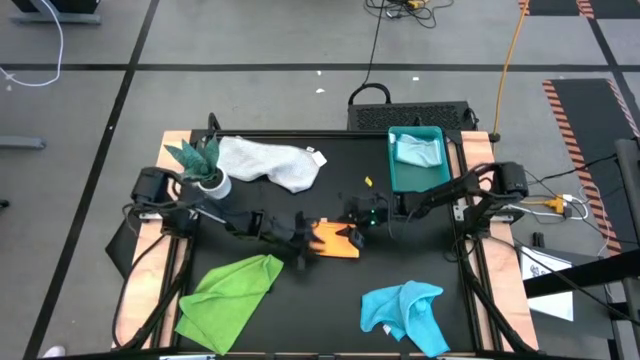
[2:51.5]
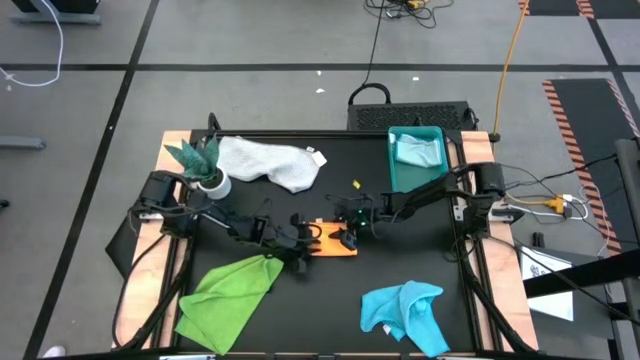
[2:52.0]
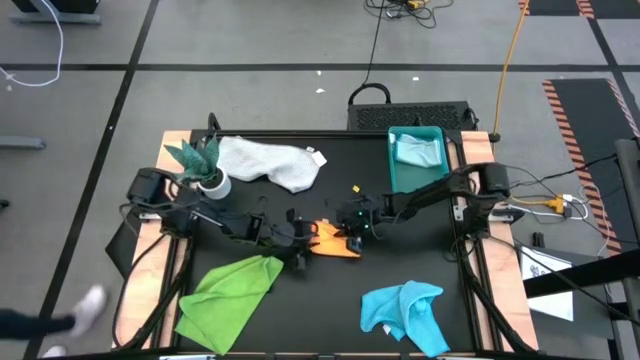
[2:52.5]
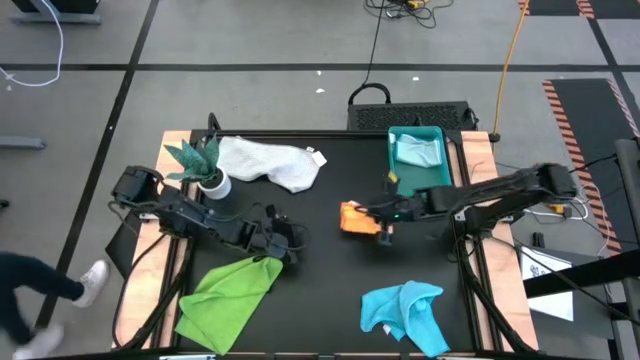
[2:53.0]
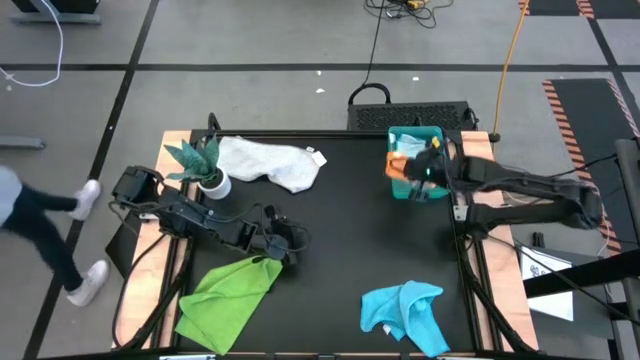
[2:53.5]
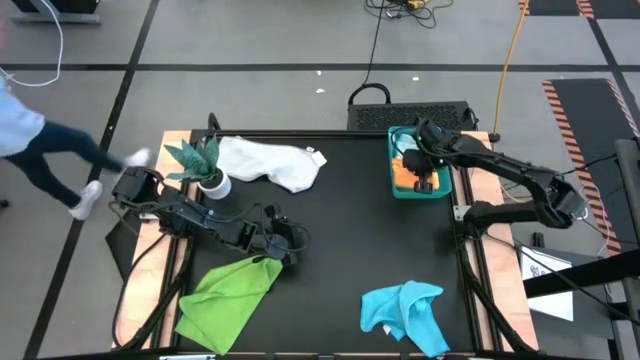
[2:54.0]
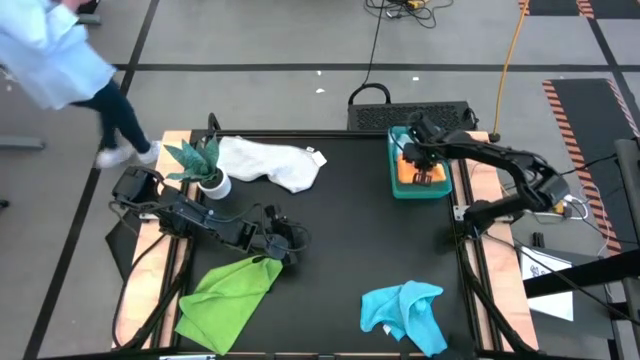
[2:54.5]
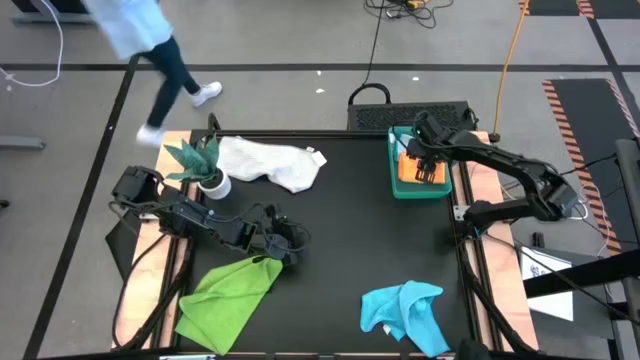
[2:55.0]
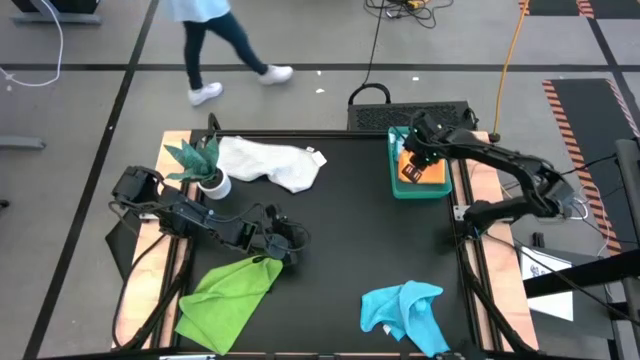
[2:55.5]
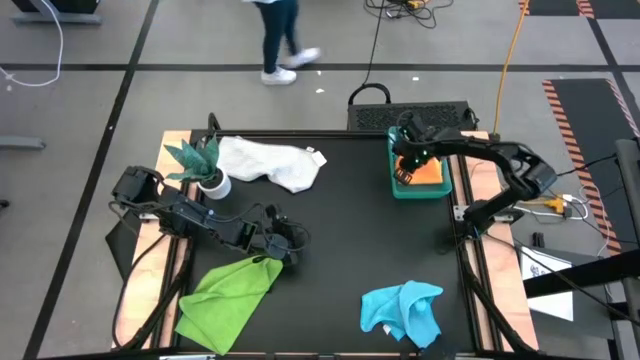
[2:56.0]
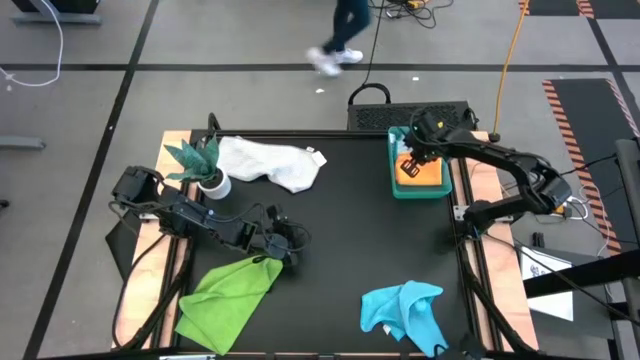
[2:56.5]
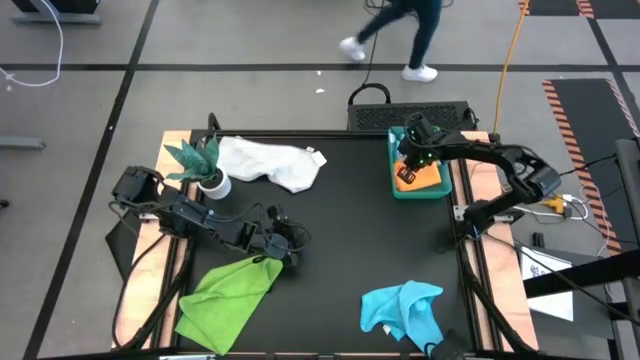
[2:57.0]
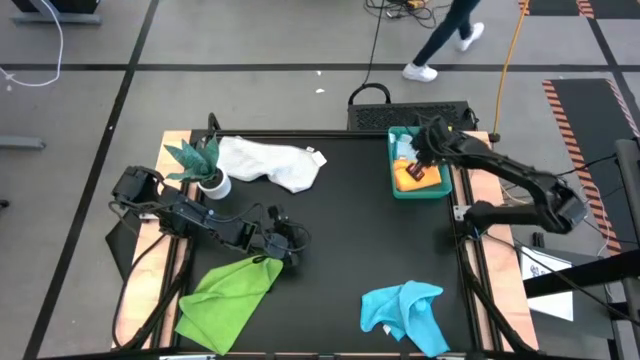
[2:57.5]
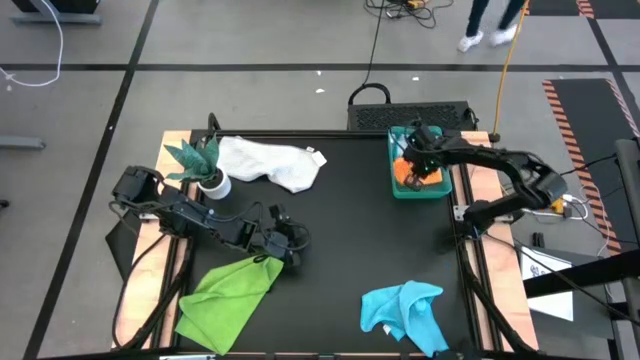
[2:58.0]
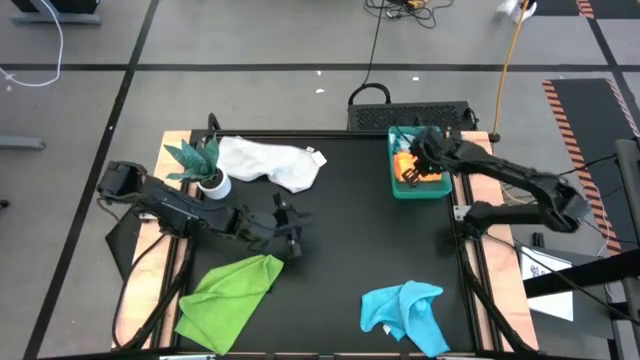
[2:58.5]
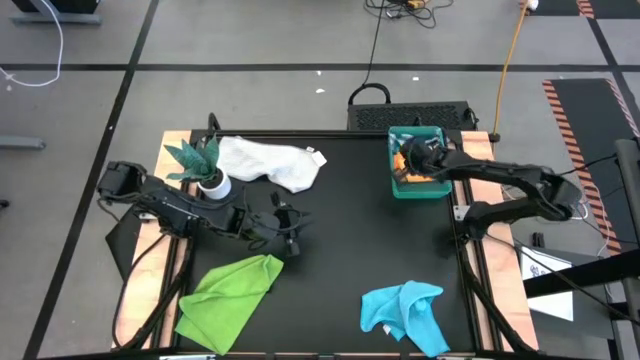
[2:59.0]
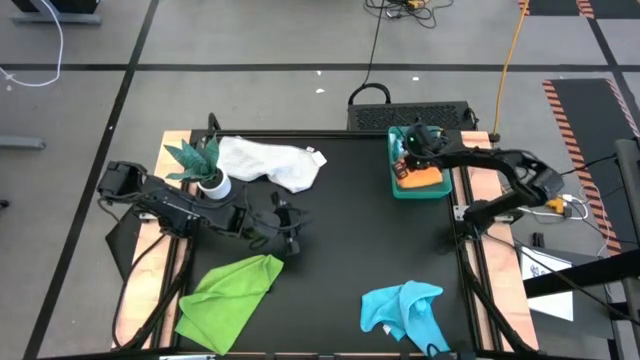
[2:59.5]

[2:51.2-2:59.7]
Task: Fold microfiber towels
Put the orange microfiber cloth into the green bin

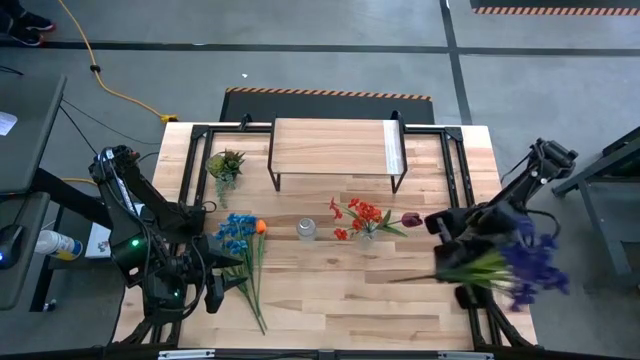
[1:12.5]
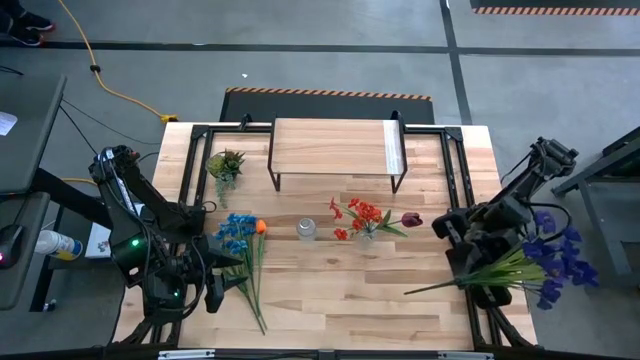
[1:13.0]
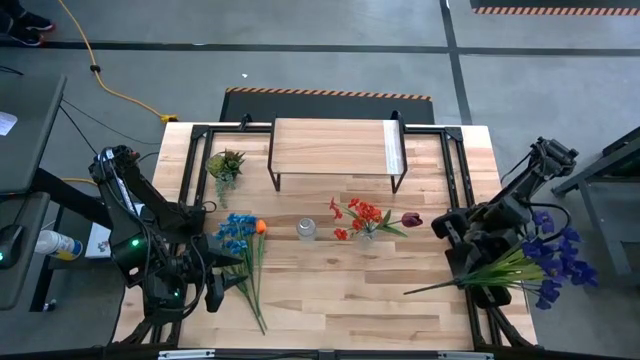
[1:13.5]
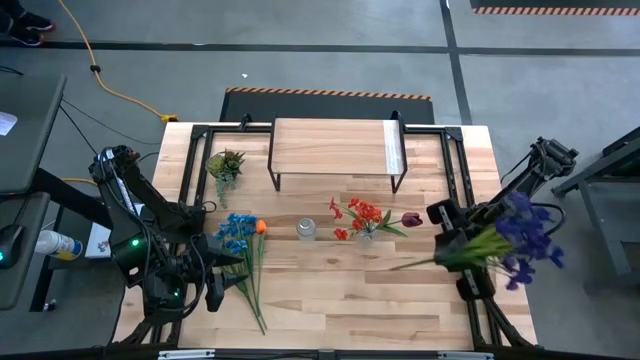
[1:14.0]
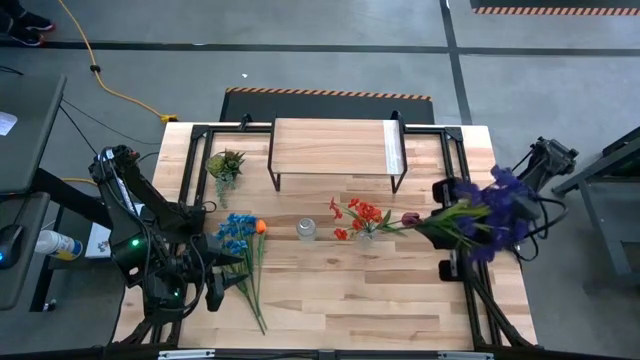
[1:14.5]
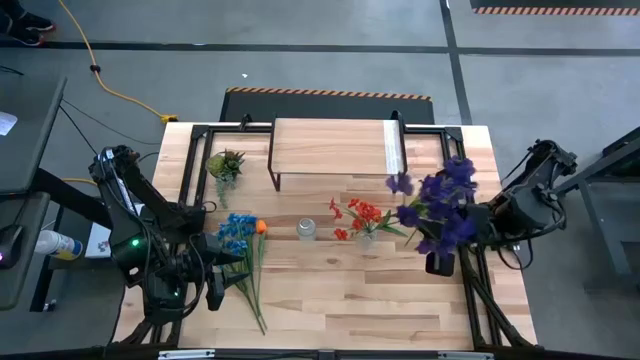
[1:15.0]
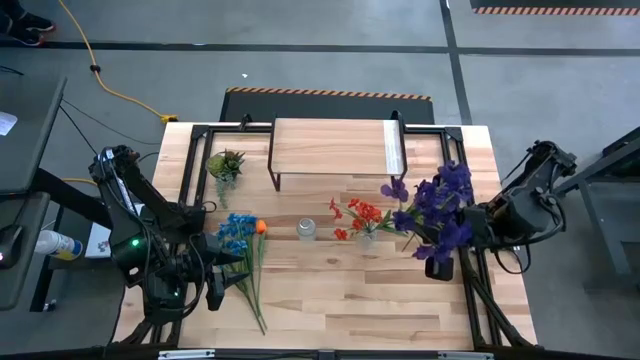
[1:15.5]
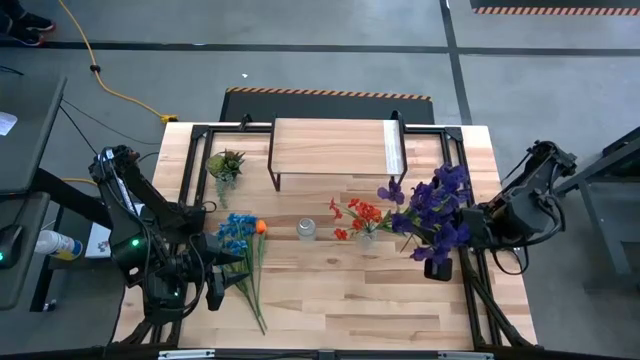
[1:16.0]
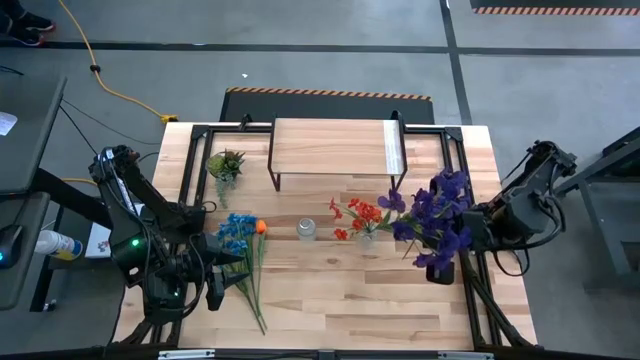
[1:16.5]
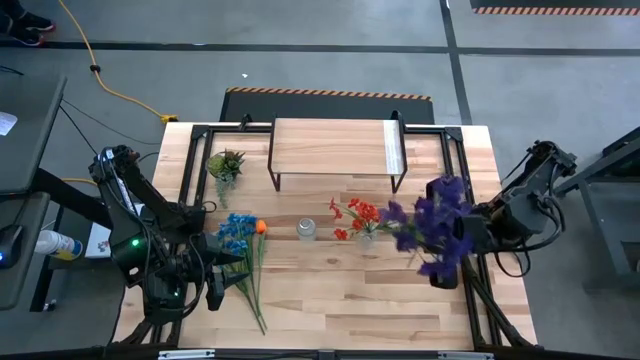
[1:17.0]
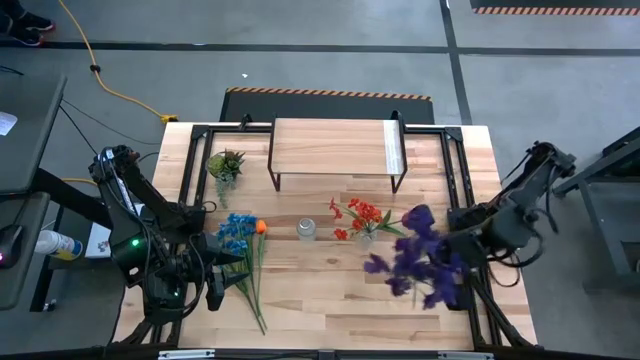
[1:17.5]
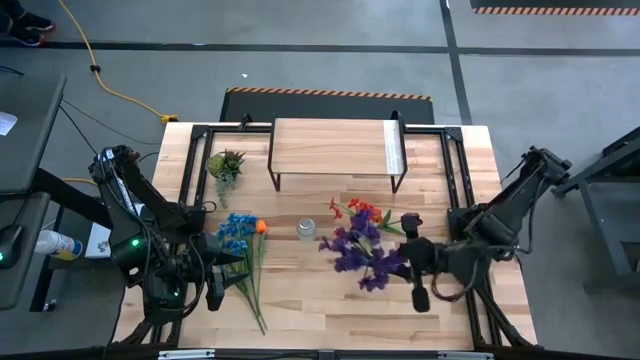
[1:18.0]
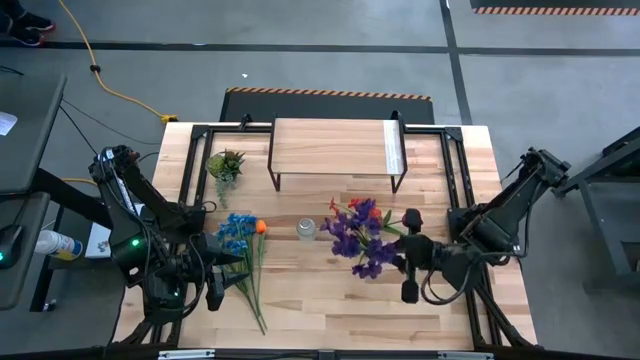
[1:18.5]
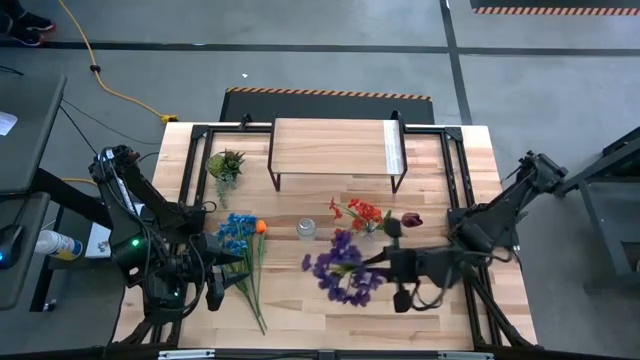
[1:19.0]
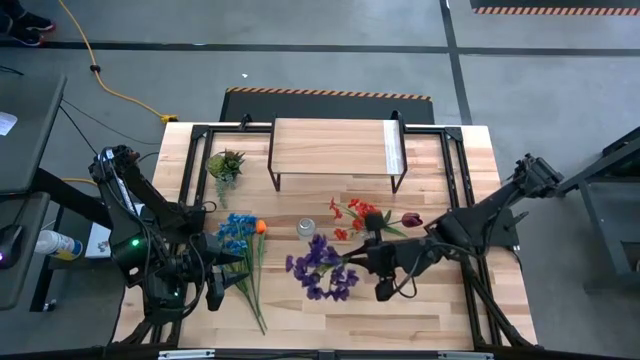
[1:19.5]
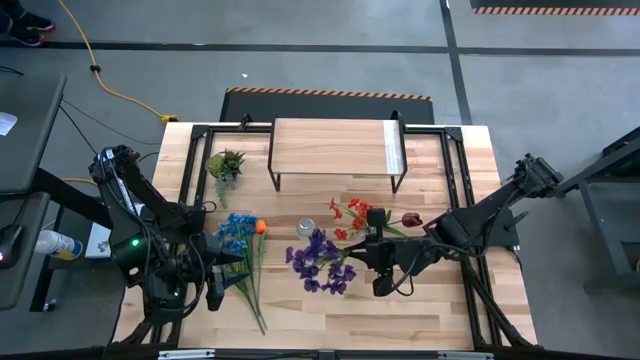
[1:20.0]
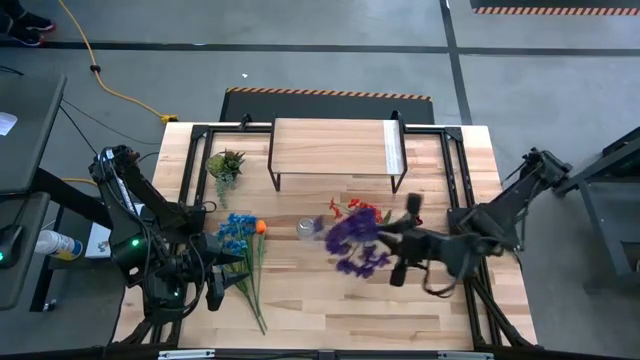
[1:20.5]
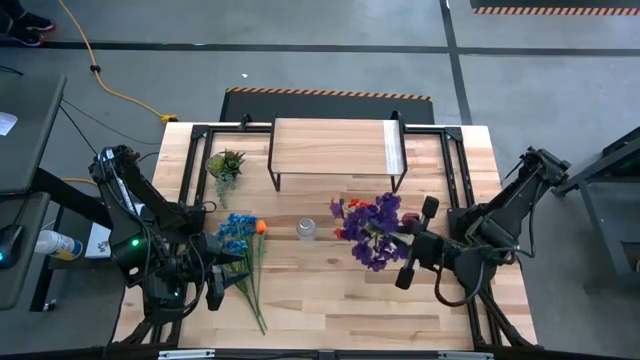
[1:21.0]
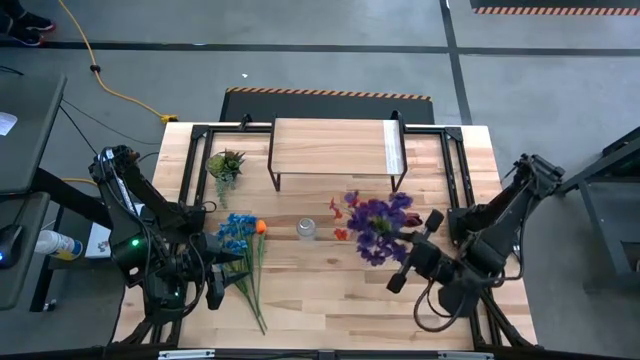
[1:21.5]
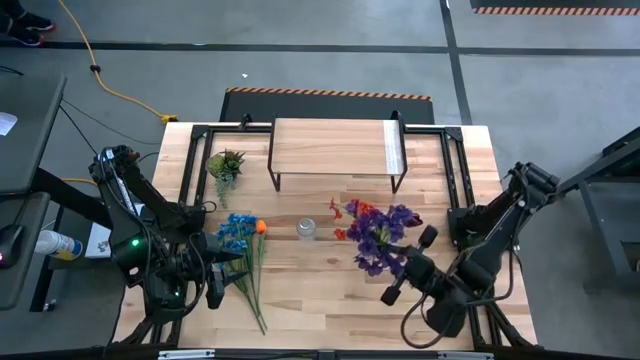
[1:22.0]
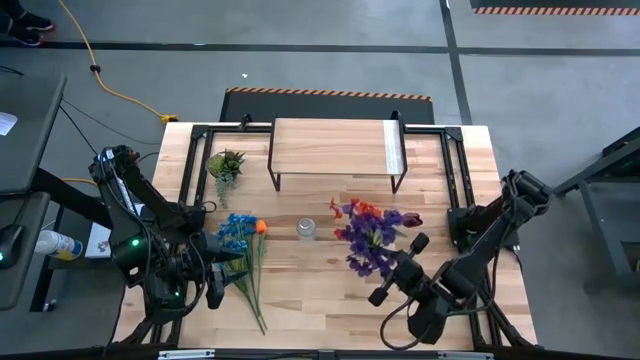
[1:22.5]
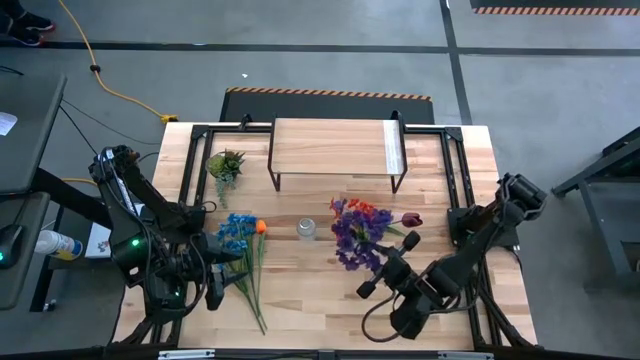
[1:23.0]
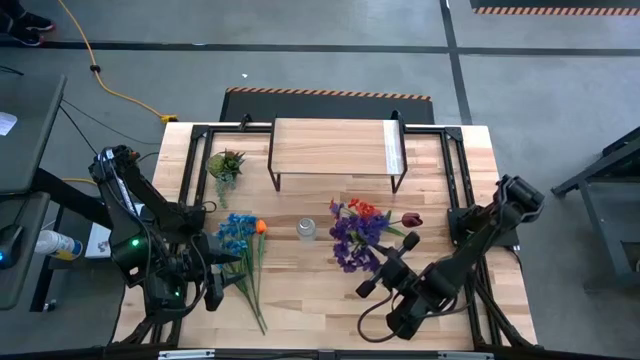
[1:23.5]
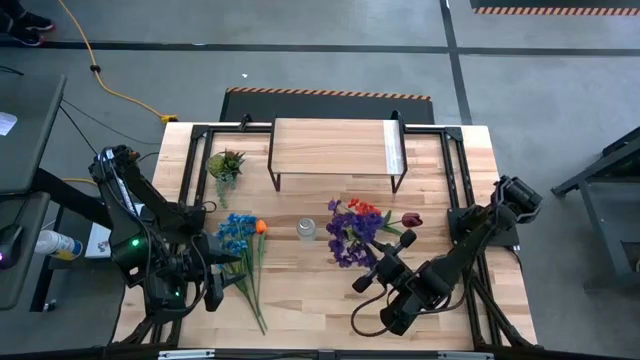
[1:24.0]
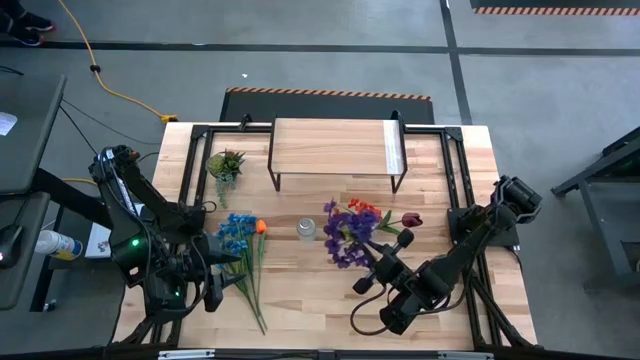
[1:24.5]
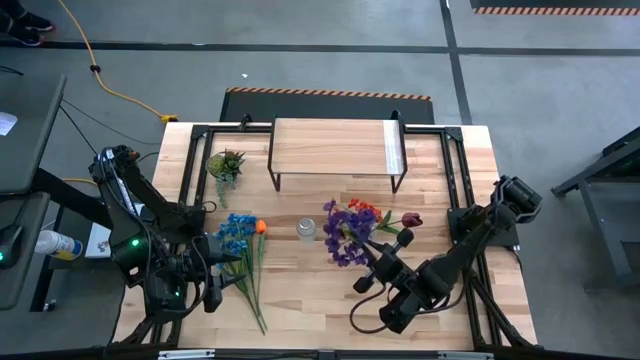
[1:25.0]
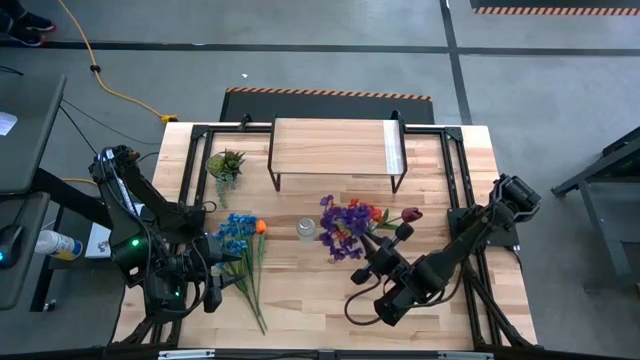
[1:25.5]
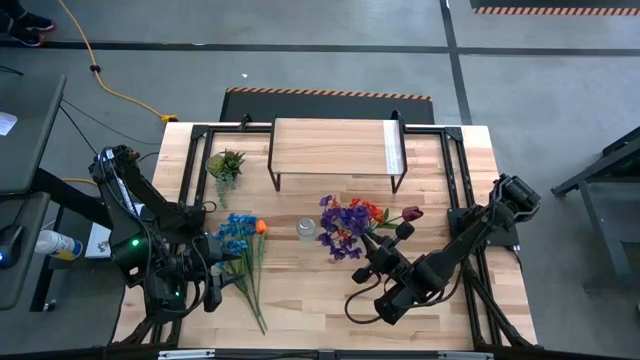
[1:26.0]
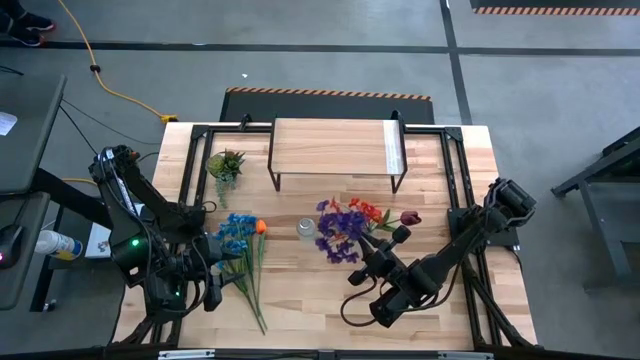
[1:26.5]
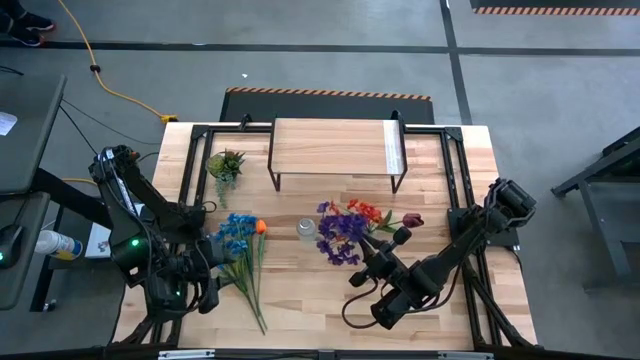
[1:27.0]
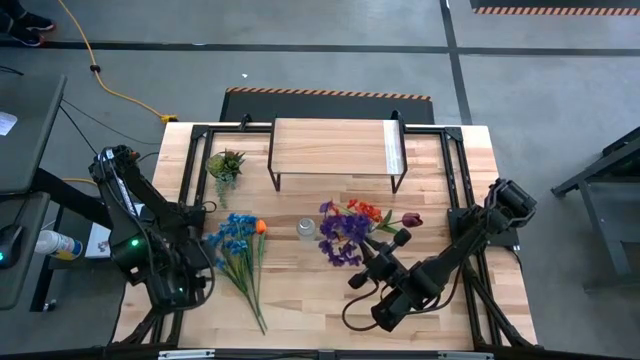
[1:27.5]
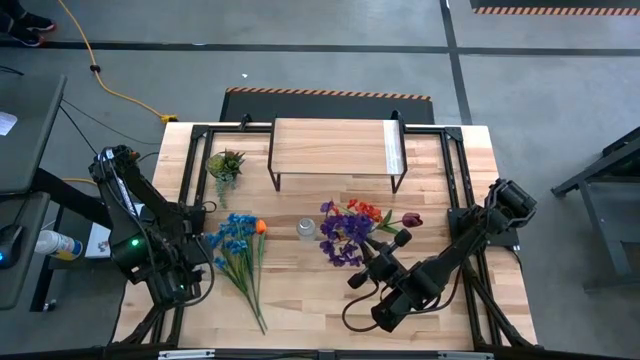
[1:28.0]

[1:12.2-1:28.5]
Task: Pick and place flowers into a vace then onto a shelf
Put the purple flowers into the right transparent flower vase
